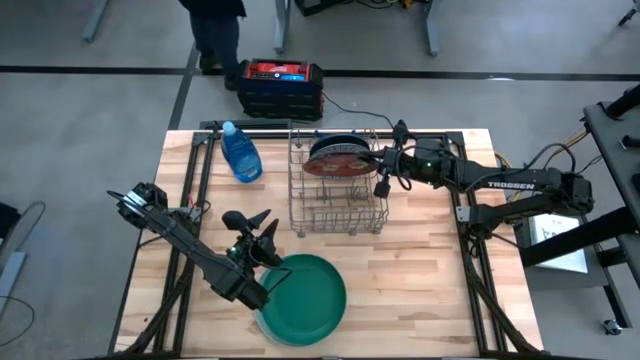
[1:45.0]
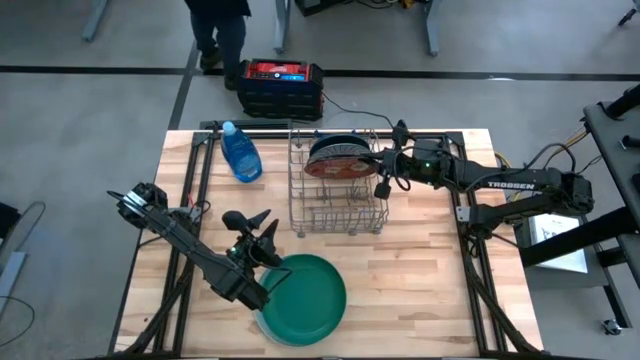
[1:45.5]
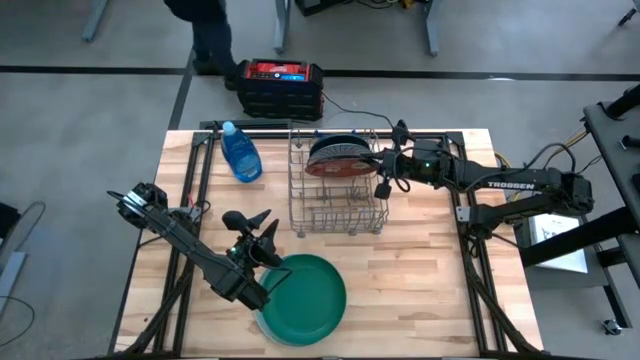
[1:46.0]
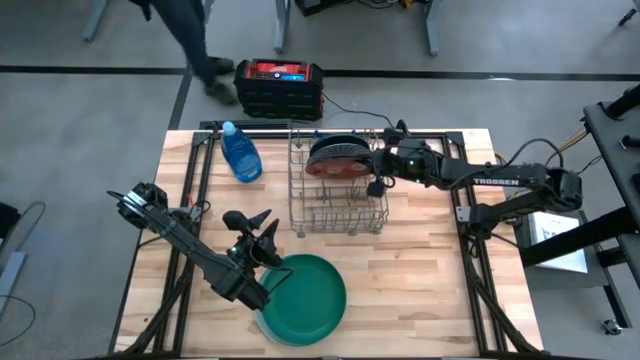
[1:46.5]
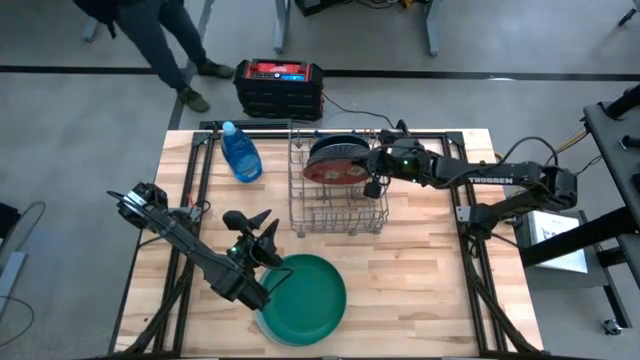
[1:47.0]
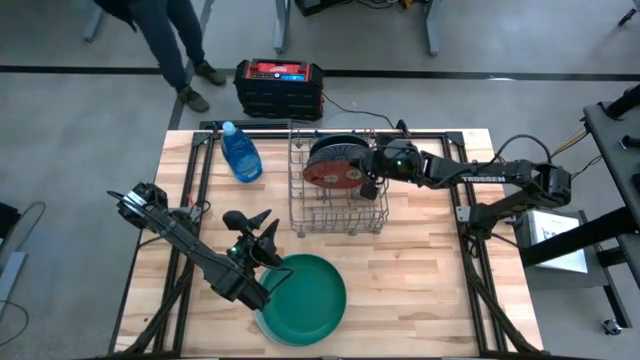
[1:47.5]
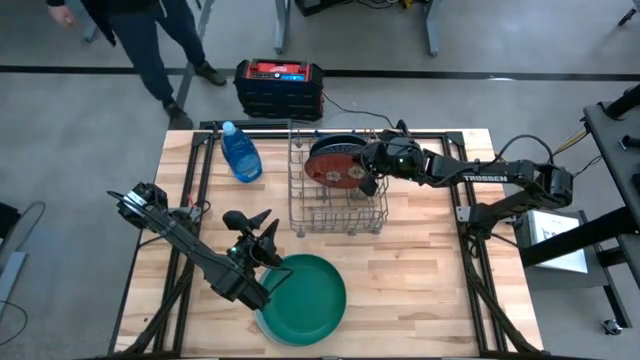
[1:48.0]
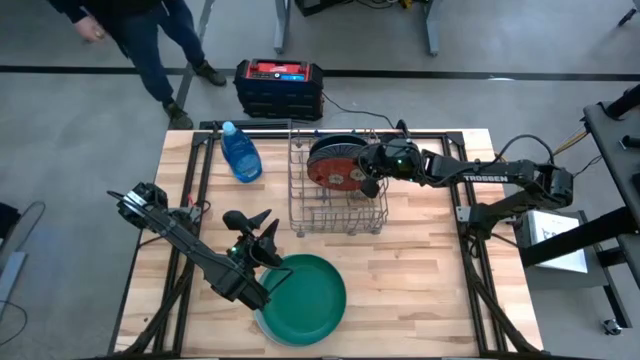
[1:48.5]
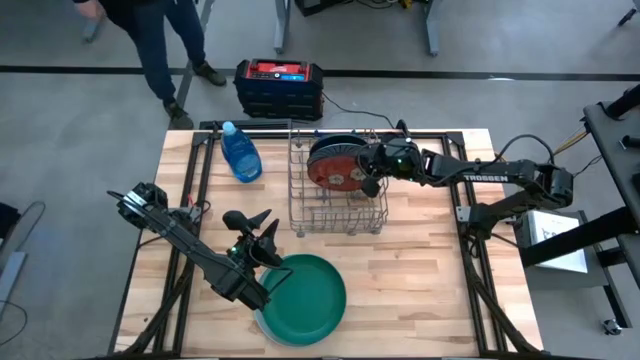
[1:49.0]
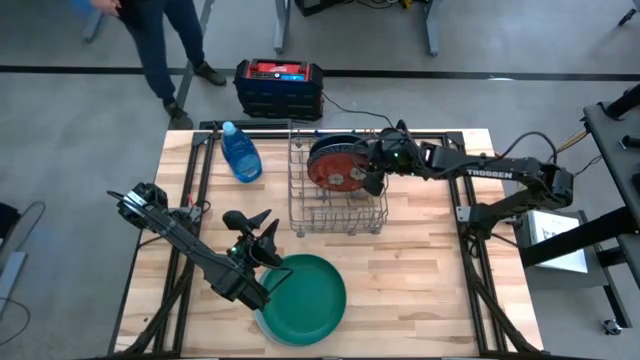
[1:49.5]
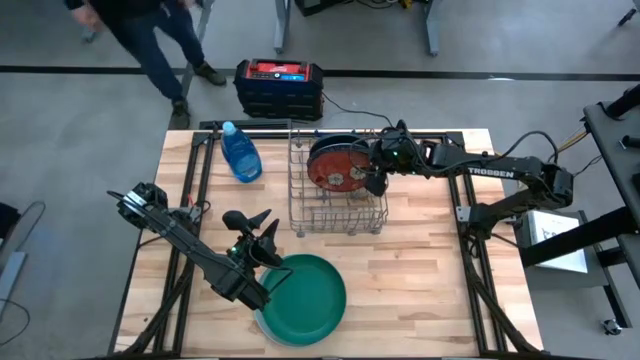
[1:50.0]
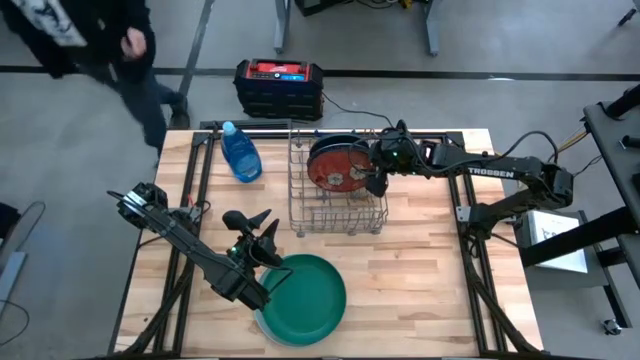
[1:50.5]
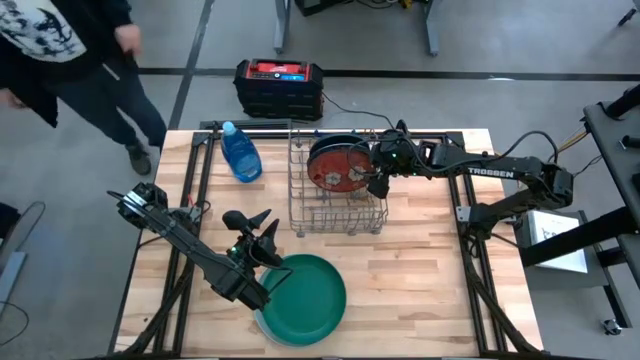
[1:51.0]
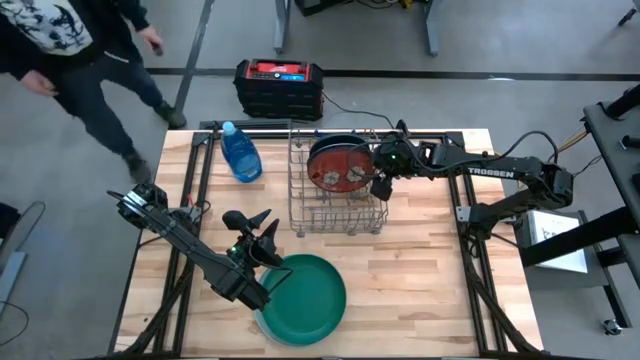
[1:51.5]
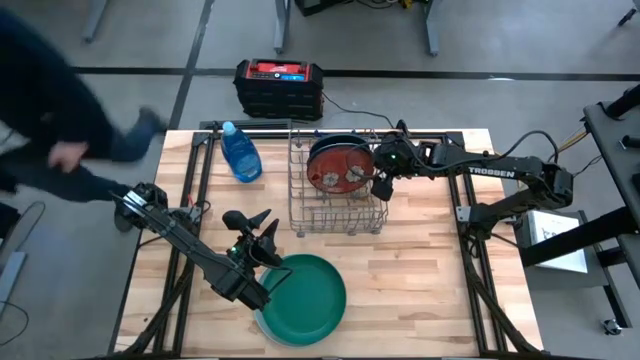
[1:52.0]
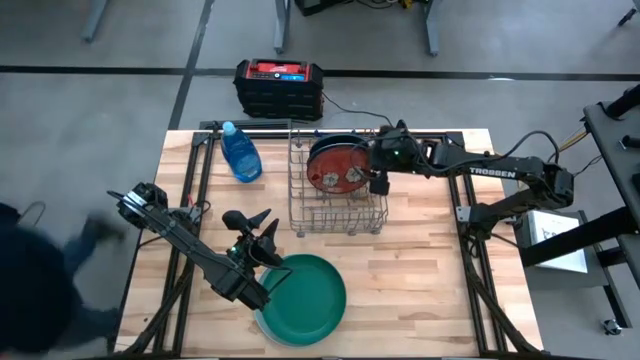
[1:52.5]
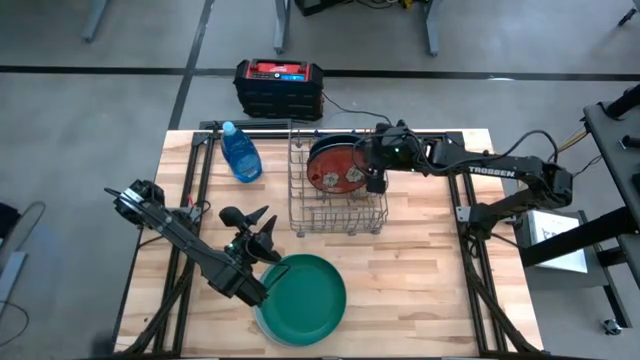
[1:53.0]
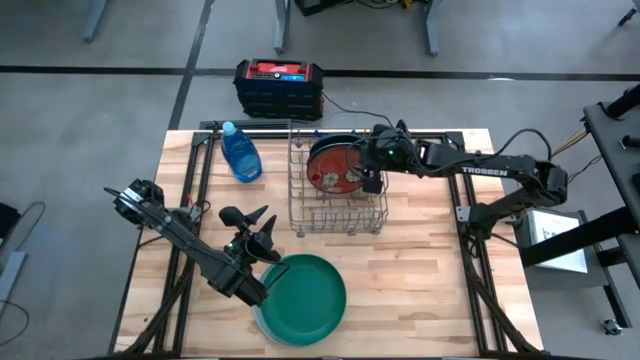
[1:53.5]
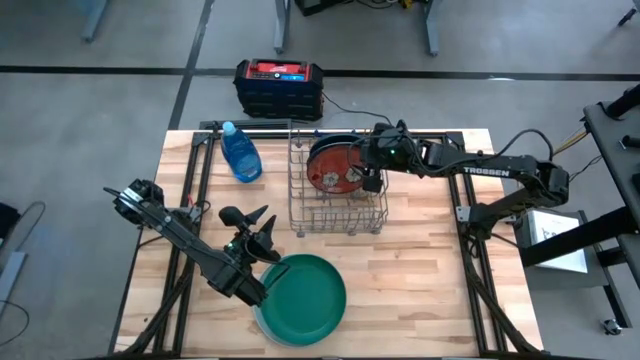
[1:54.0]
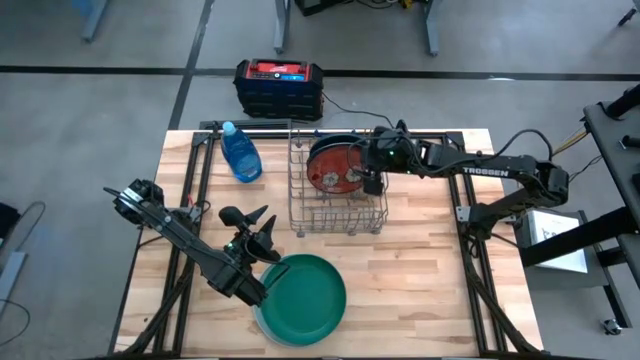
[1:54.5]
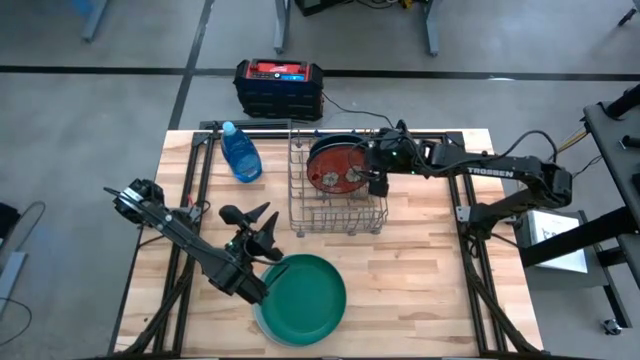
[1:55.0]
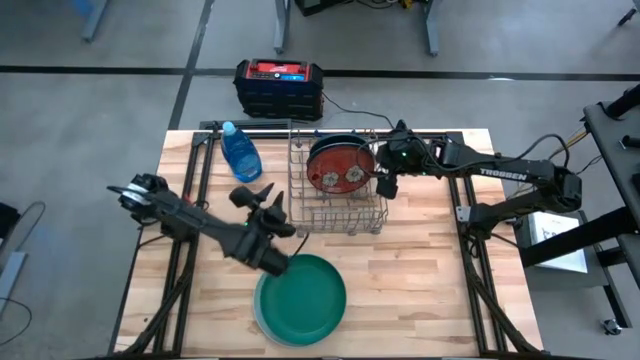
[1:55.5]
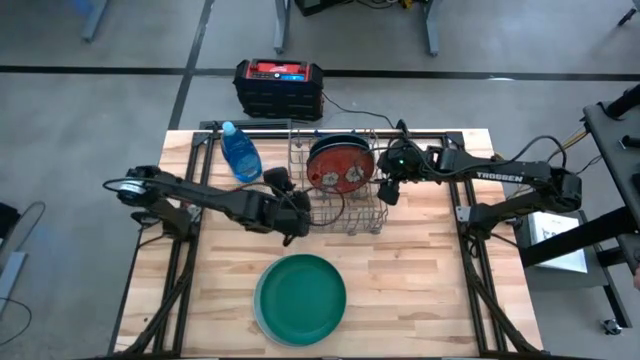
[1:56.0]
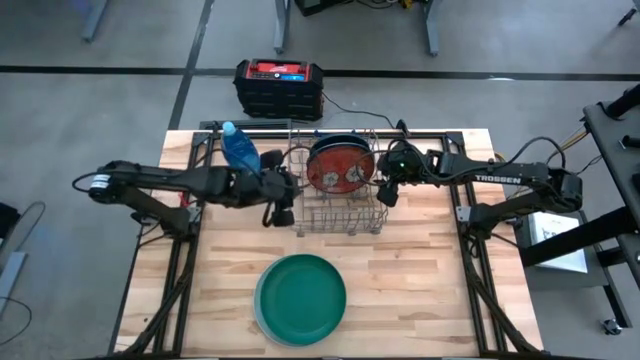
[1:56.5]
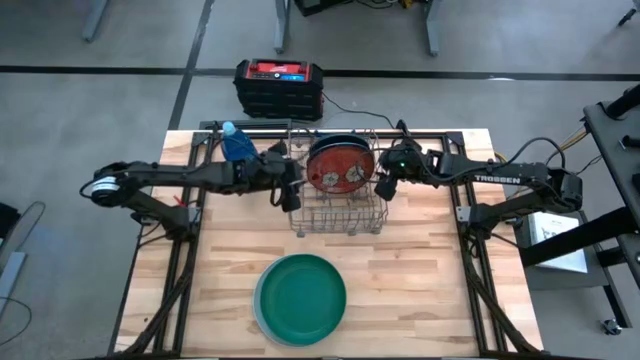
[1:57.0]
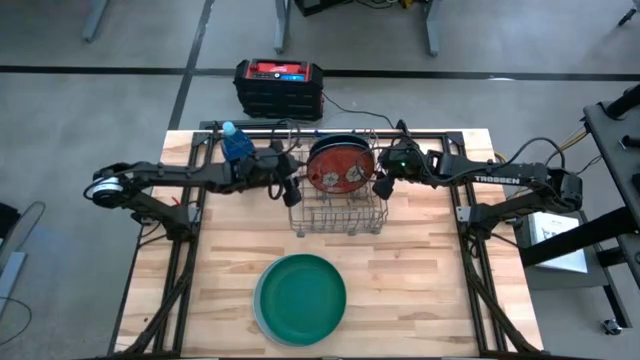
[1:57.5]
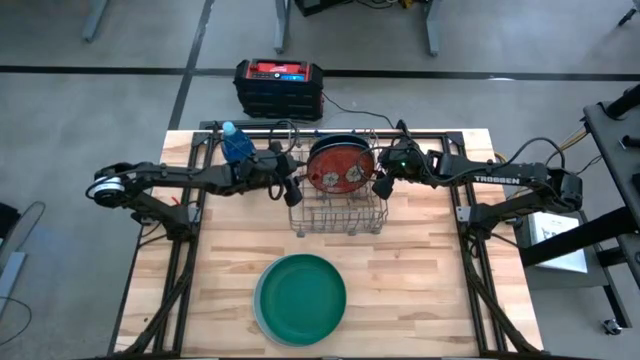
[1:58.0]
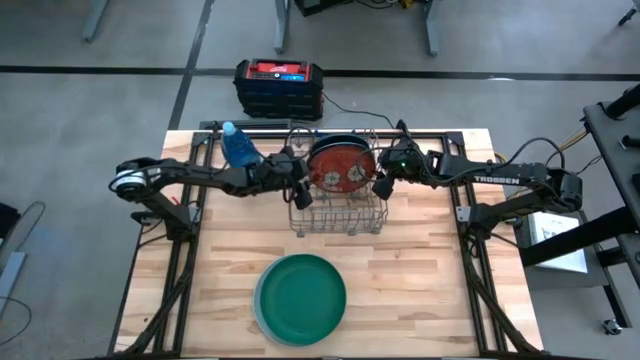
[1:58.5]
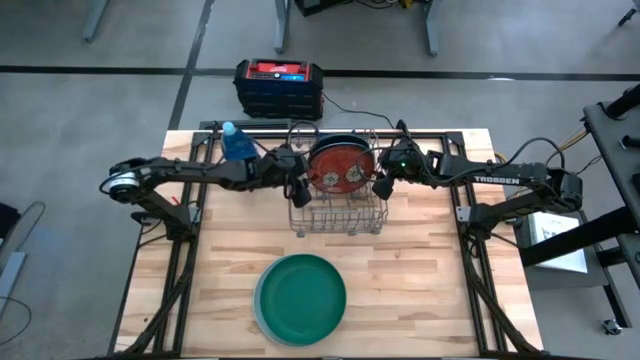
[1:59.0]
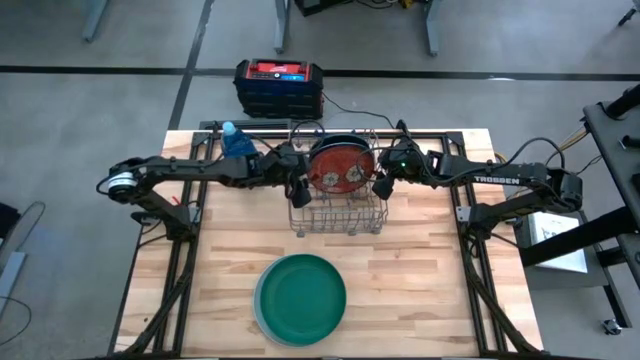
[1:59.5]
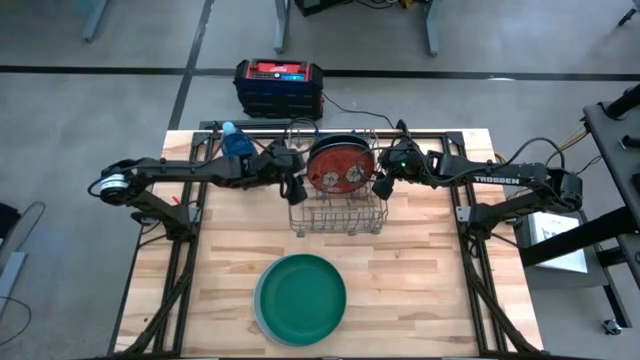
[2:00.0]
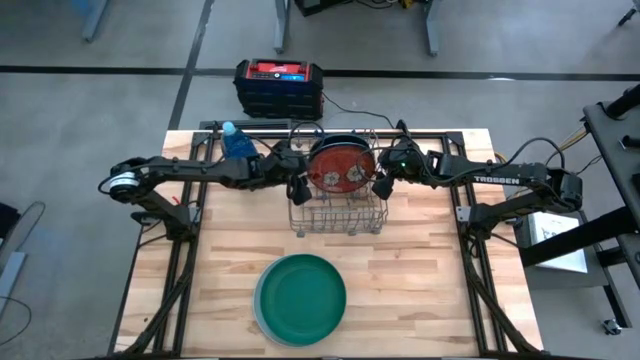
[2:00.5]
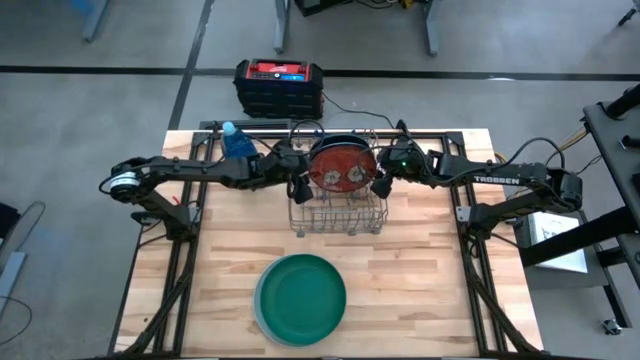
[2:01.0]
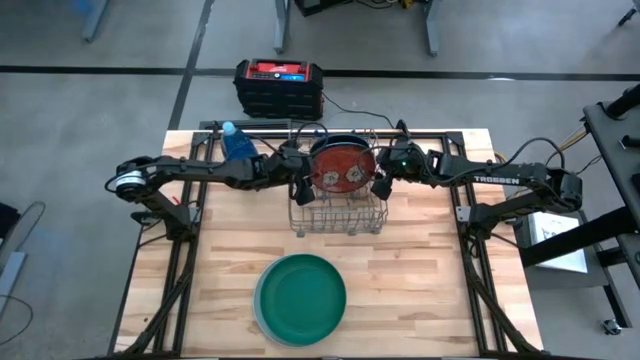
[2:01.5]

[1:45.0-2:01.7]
Task: Sort dishes
Put the red flowered plate into the gray dishwasher rack

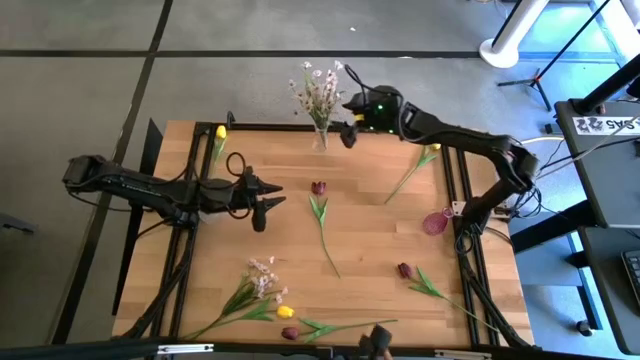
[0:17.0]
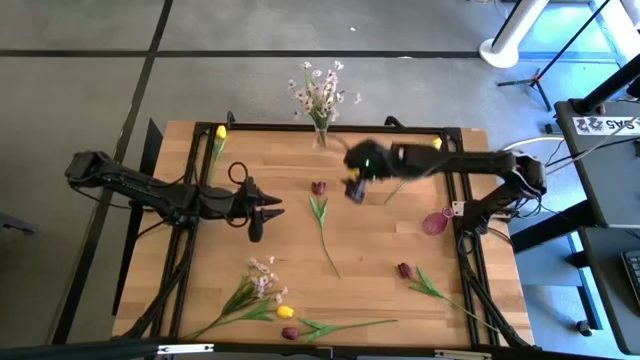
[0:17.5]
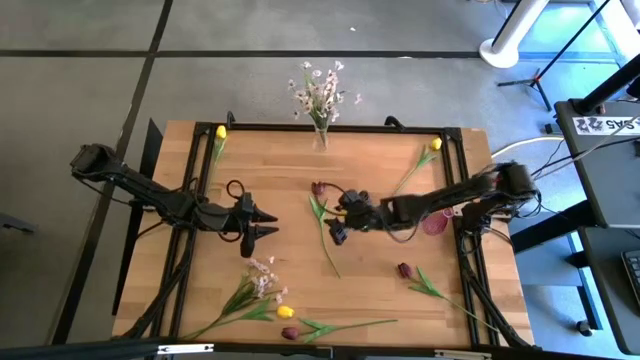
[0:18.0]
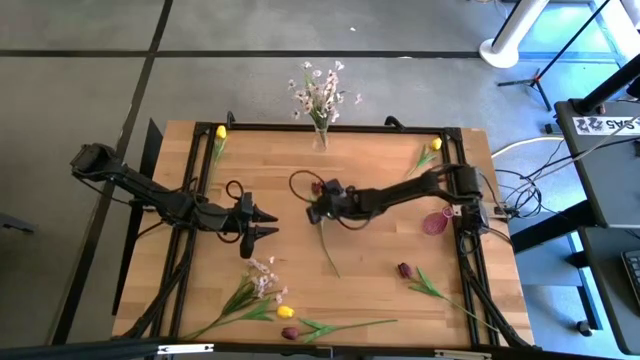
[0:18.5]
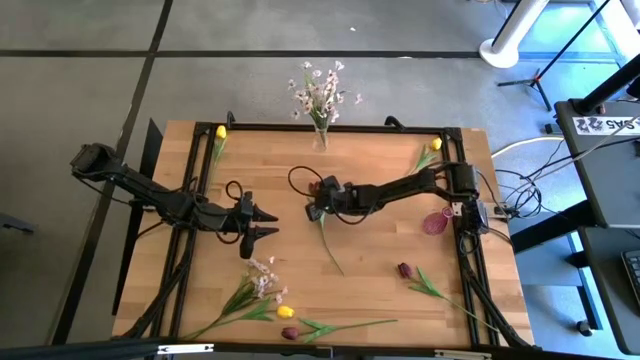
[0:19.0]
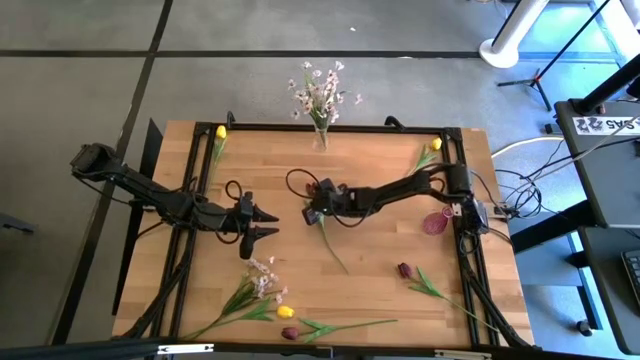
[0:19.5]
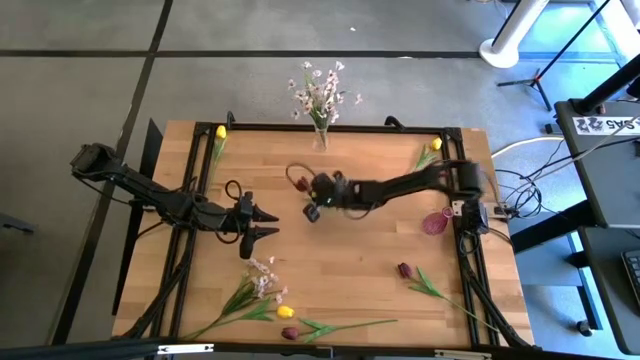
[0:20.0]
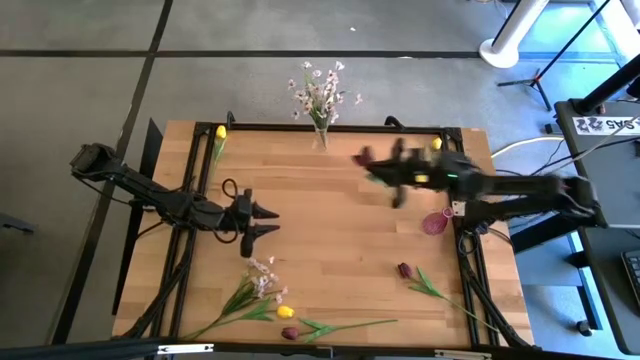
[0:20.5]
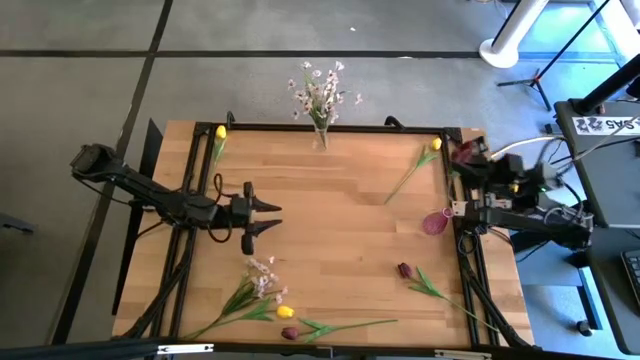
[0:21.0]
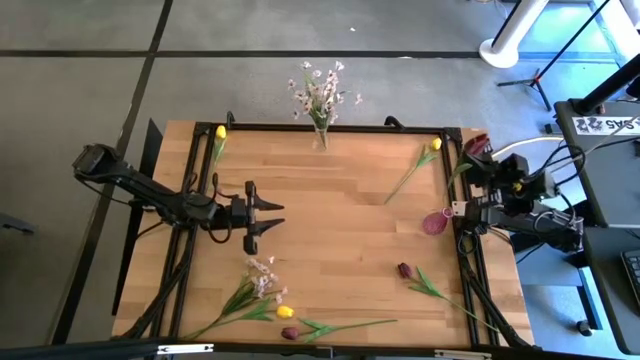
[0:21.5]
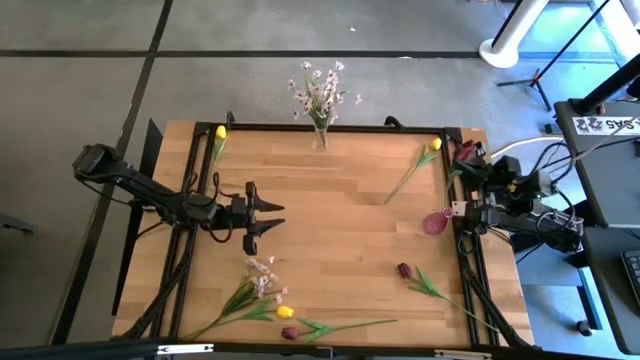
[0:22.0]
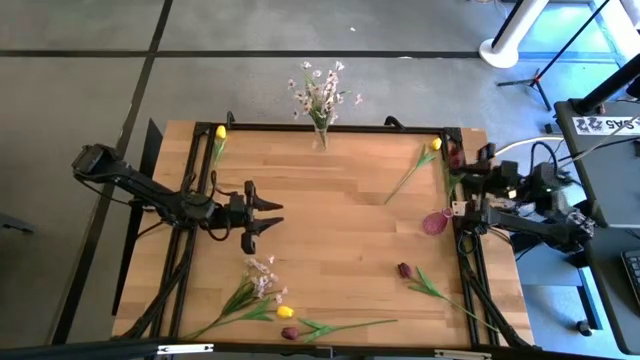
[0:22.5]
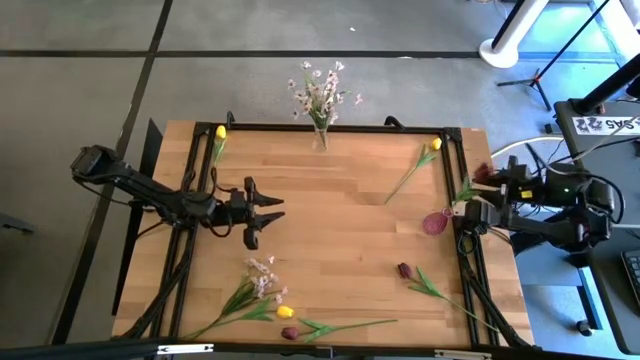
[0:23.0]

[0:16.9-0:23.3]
Task: Sort flowers into vase by color
Put the top red flower into the purple vase
